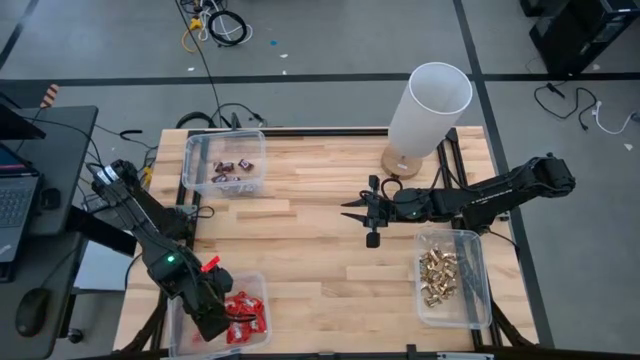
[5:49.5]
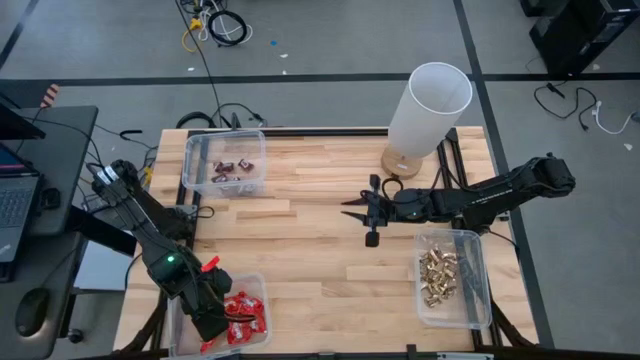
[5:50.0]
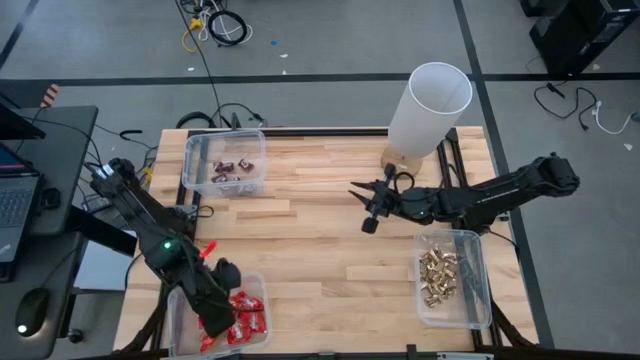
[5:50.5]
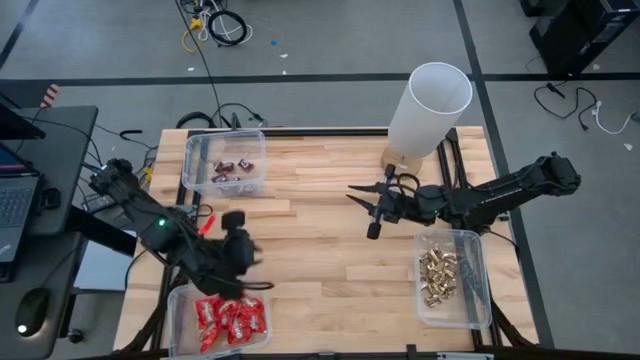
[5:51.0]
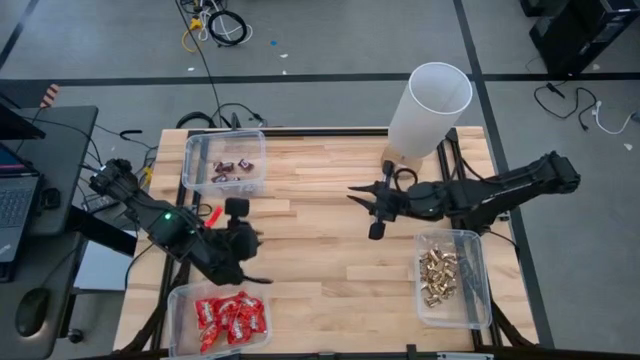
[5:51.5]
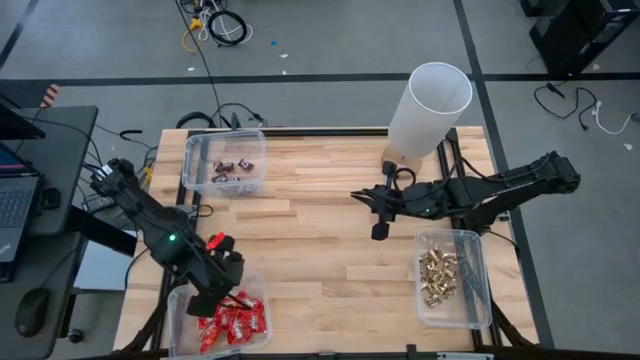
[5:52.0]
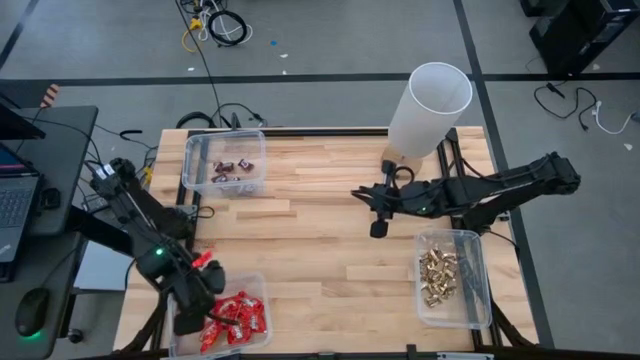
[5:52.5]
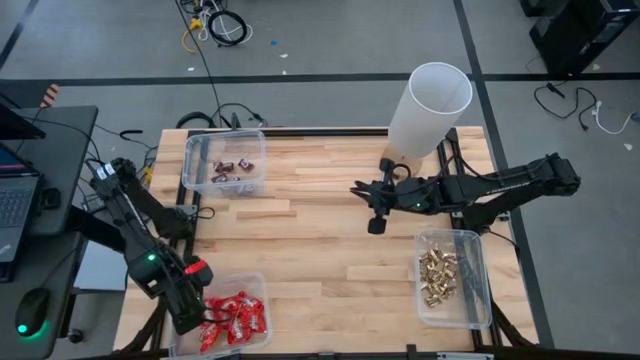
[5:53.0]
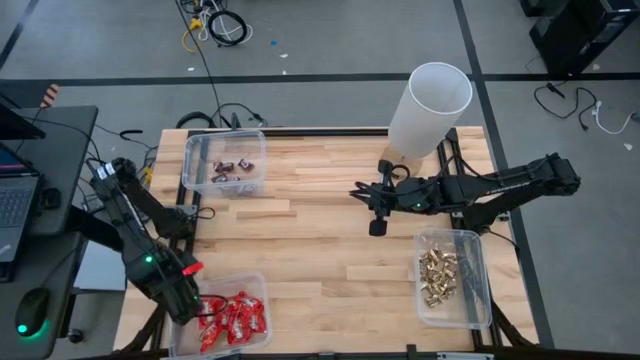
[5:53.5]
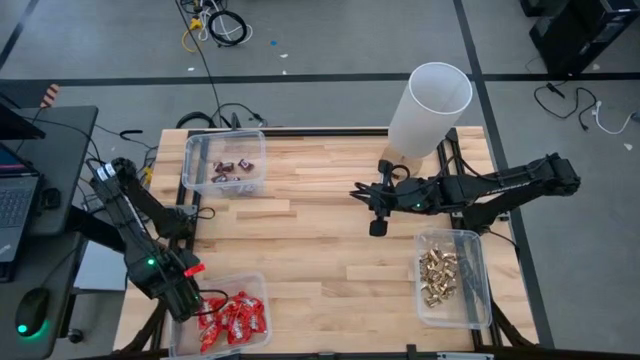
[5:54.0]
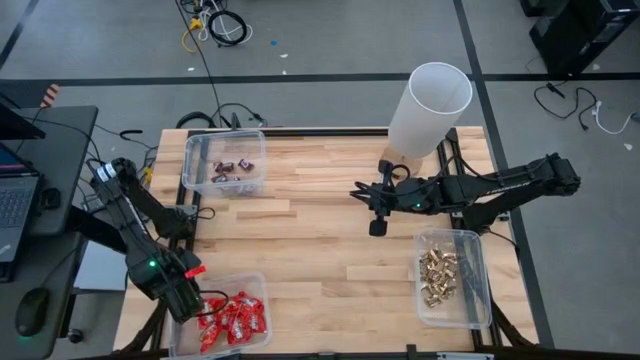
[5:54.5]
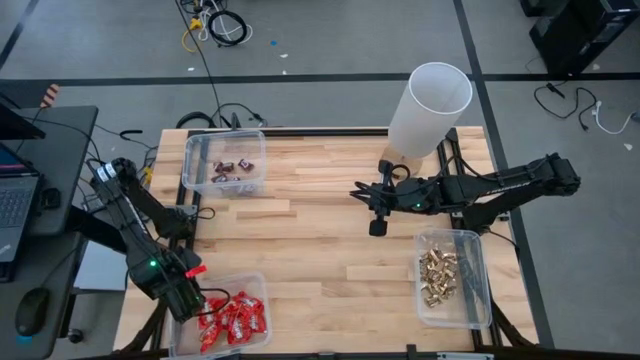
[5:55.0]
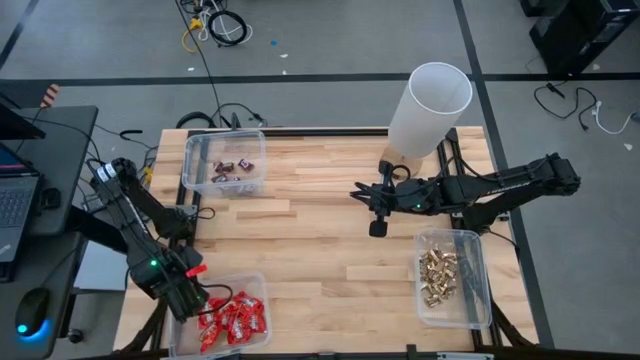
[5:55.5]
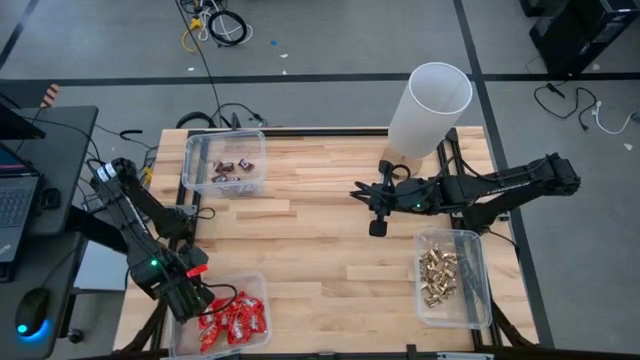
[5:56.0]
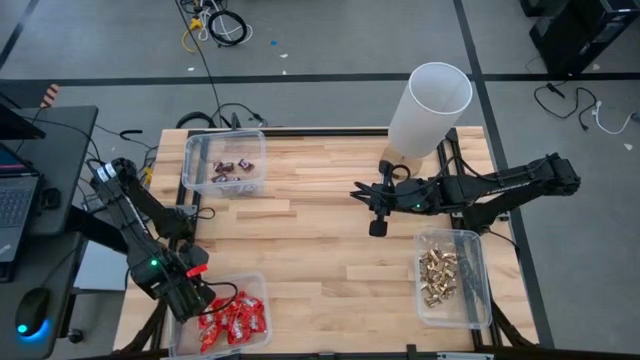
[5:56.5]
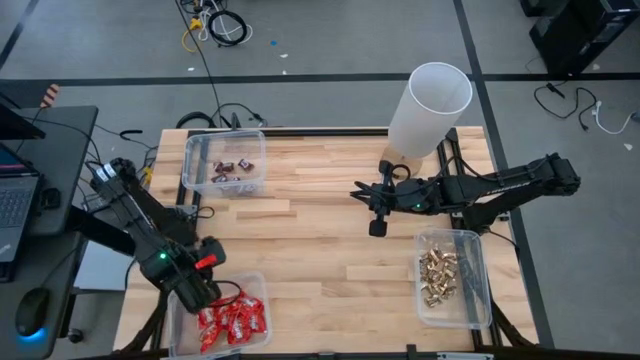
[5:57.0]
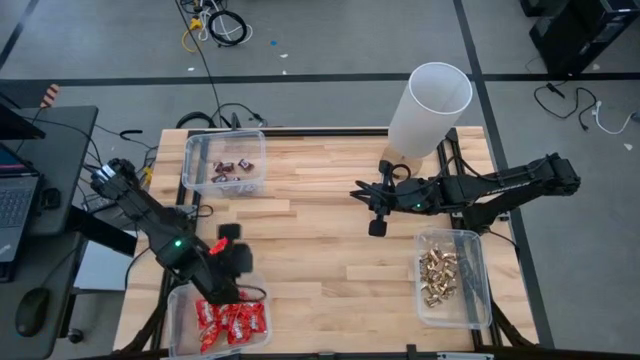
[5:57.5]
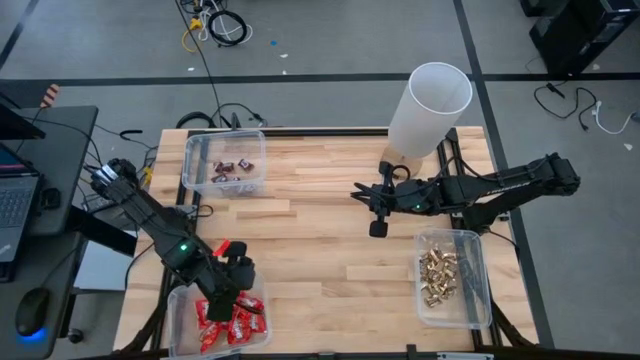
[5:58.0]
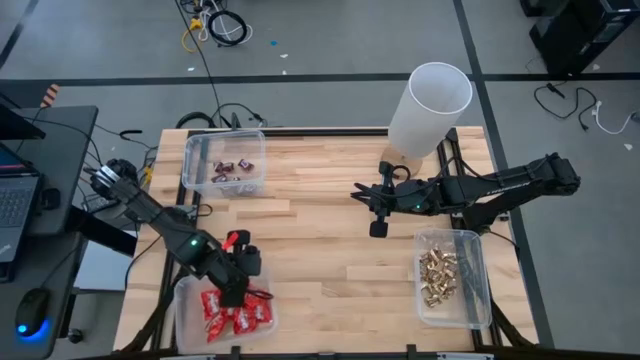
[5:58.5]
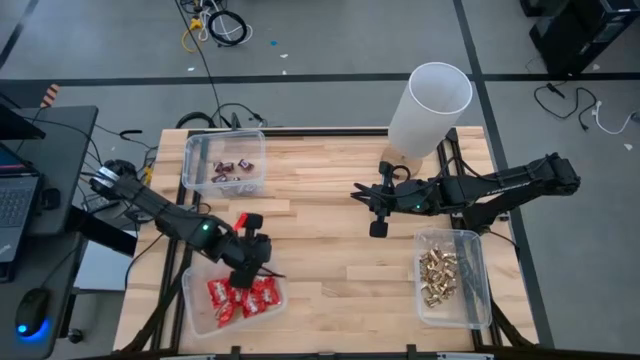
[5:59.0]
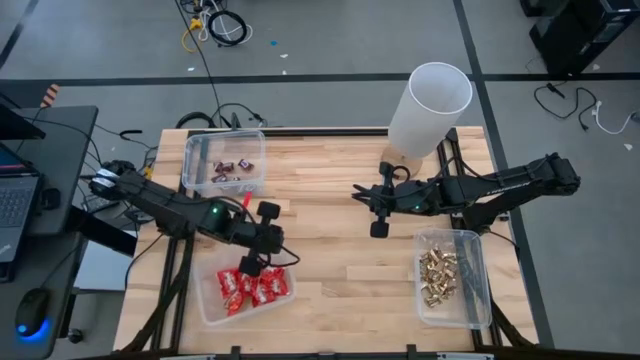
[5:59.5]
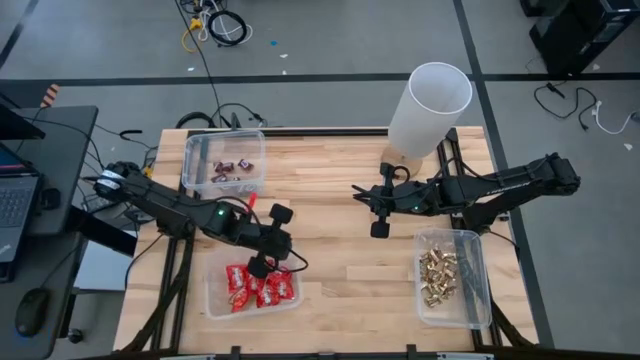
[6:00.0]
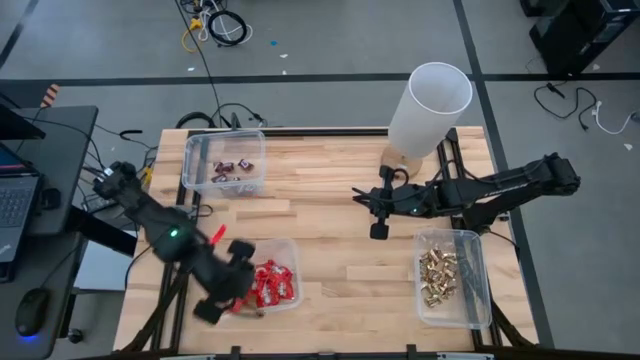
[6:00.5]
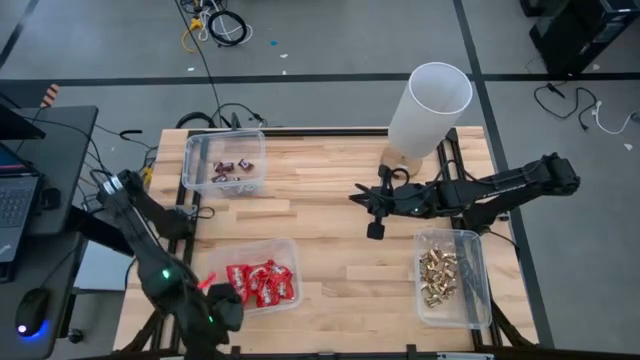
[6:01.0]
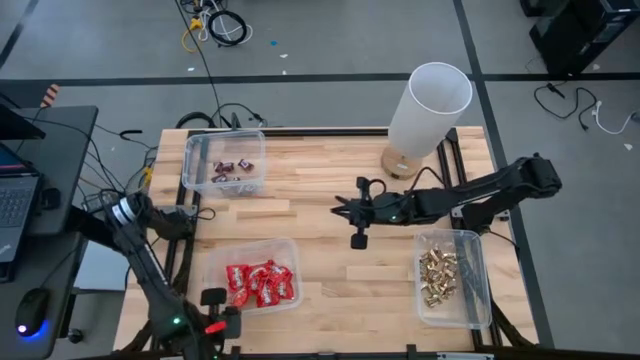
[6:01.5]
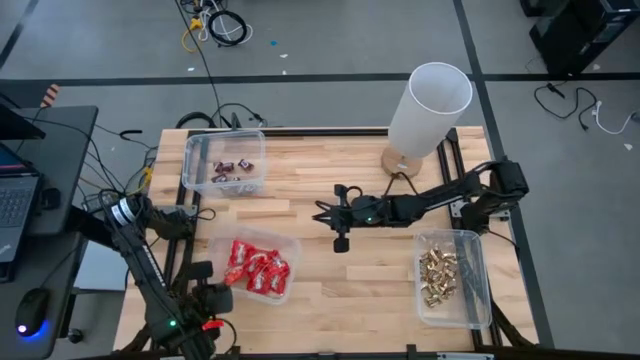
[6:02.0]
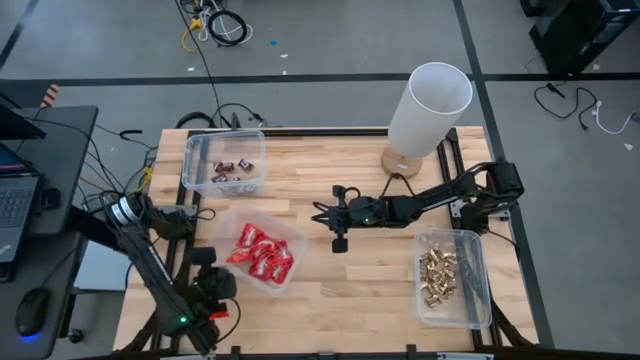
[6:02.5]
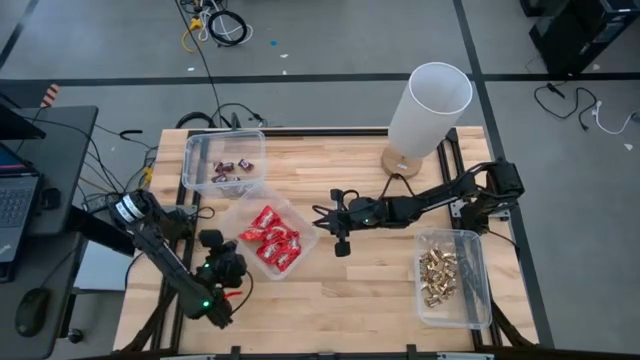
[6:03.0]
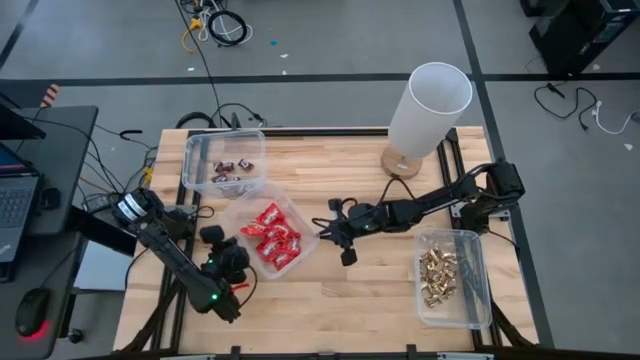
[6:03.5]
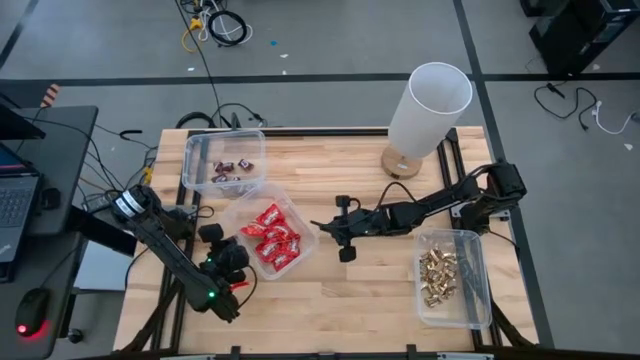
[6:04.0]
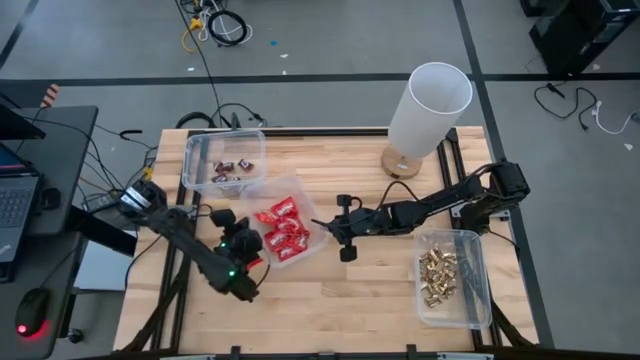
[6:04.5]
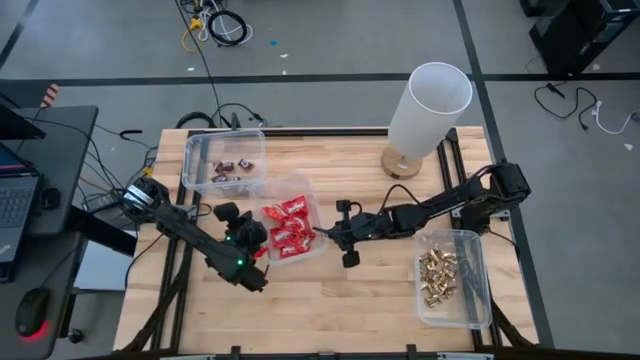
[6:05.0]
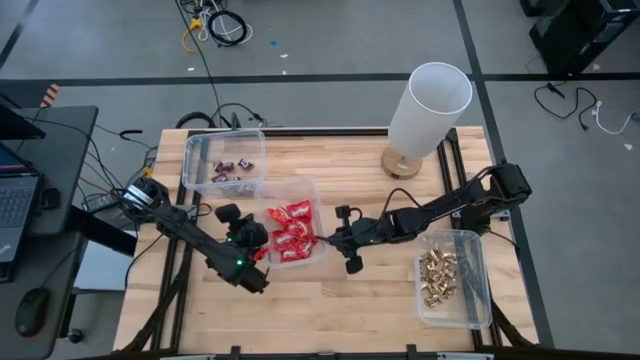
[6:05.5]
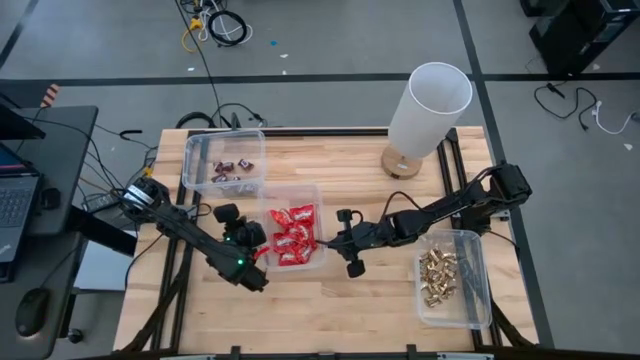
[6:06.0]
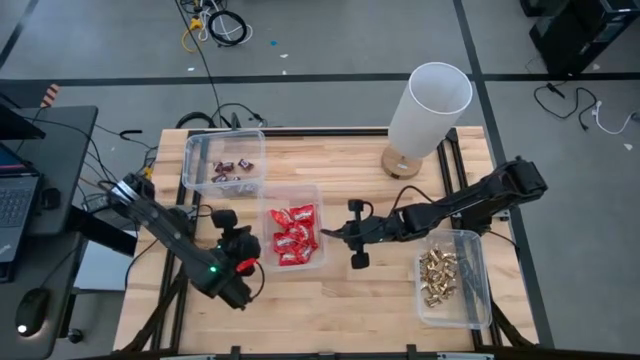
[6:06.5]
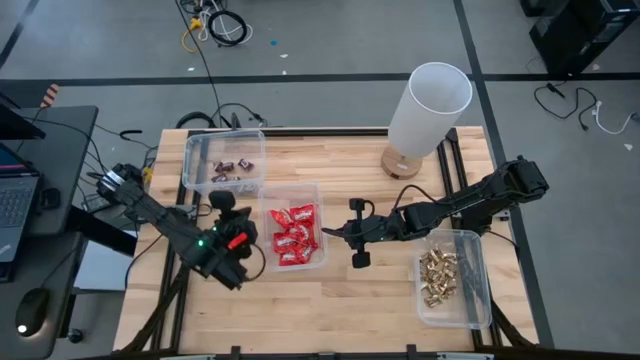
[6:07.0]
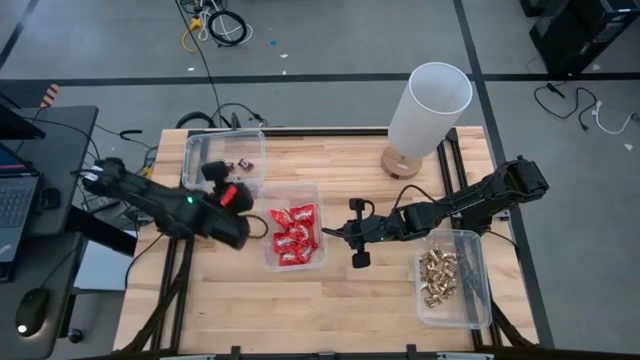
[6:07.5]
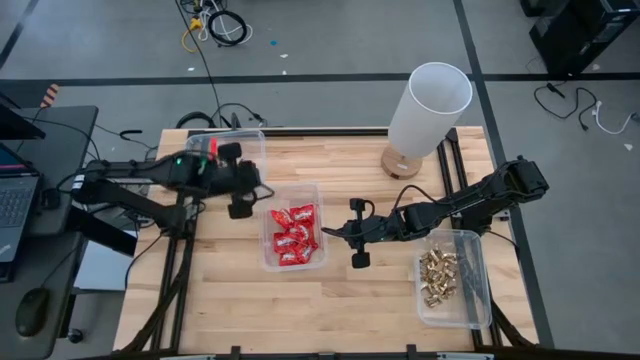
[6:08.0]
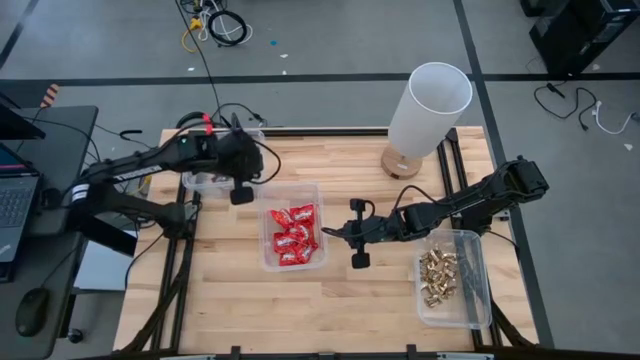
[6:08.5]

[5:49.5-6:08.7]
Task: Sort candy
Move the transparent bin to the center of the table
